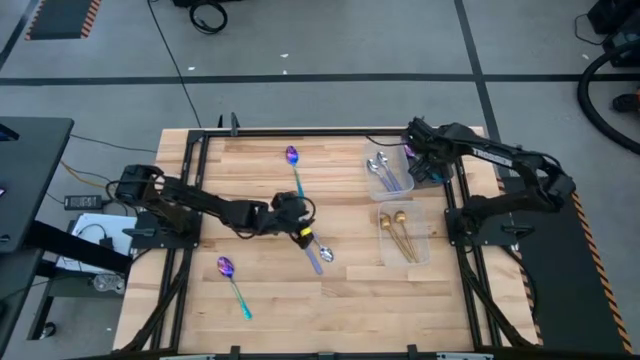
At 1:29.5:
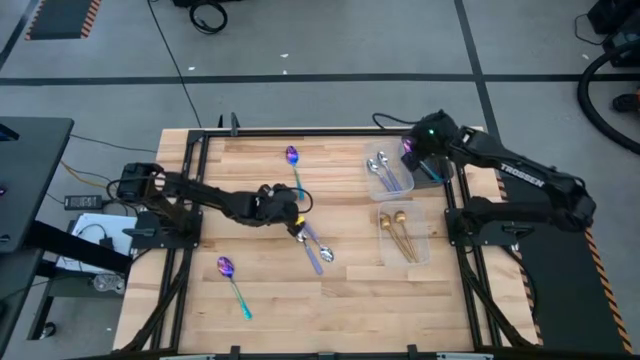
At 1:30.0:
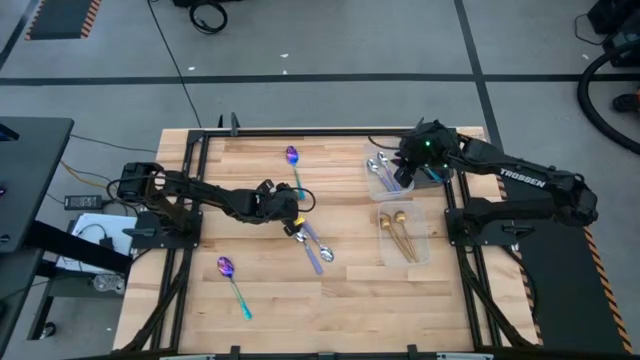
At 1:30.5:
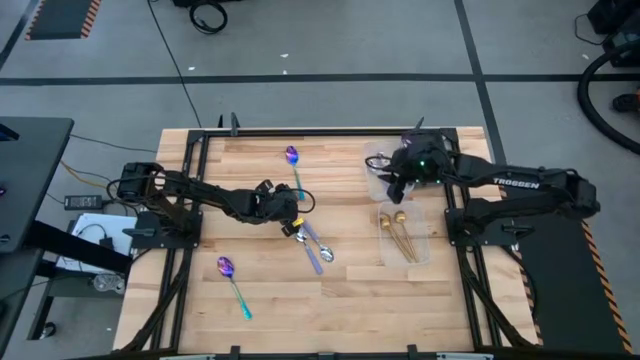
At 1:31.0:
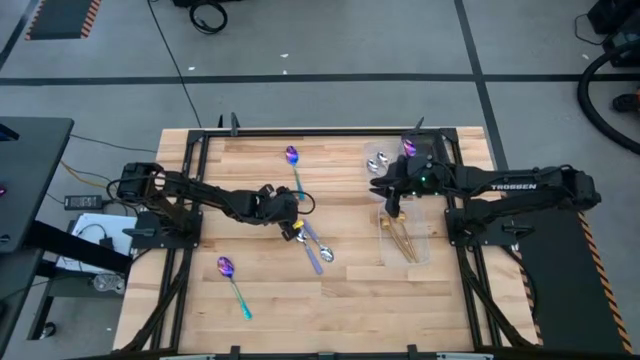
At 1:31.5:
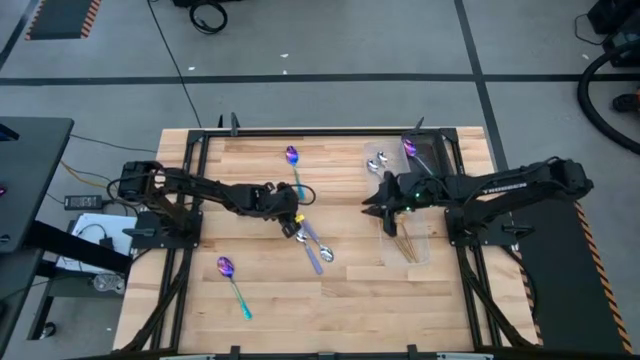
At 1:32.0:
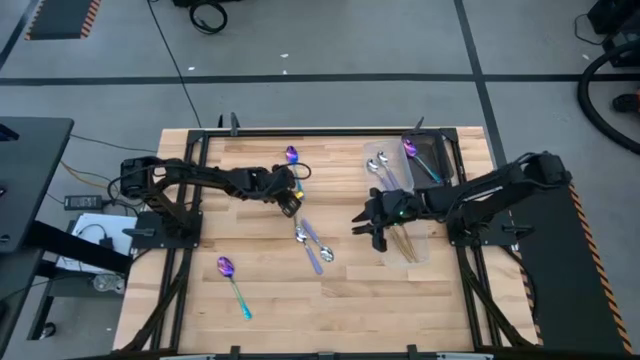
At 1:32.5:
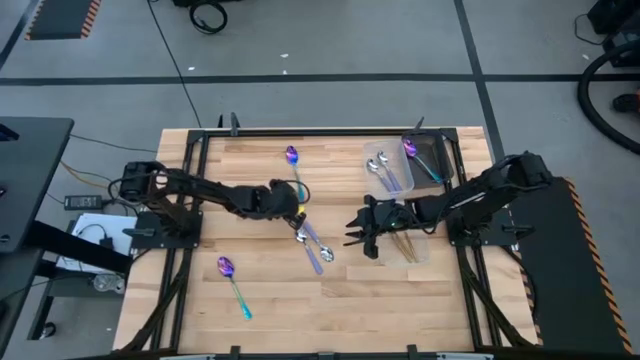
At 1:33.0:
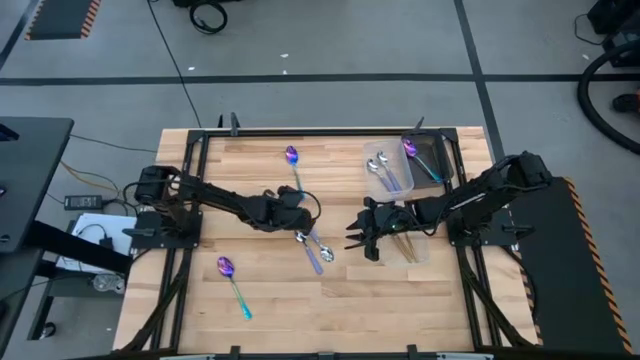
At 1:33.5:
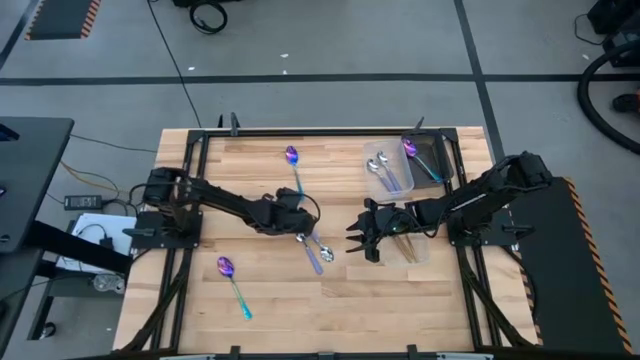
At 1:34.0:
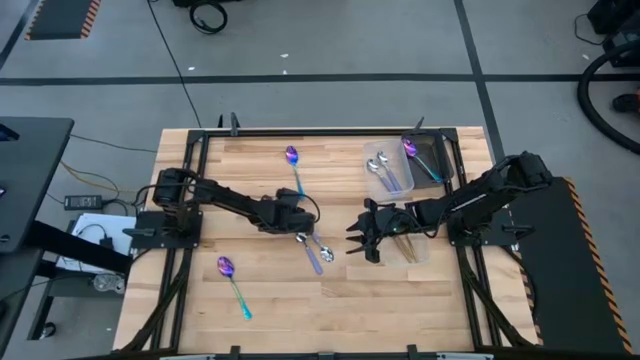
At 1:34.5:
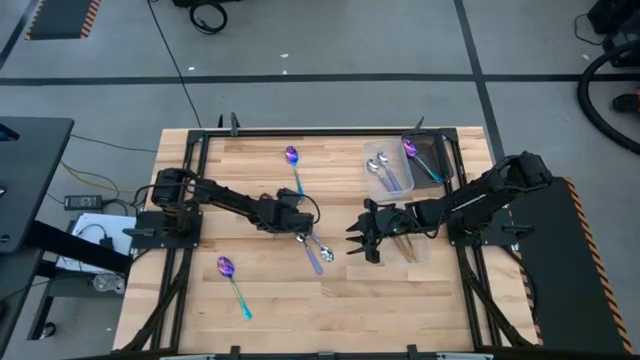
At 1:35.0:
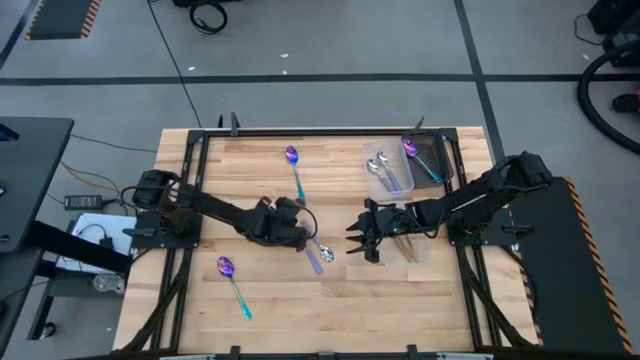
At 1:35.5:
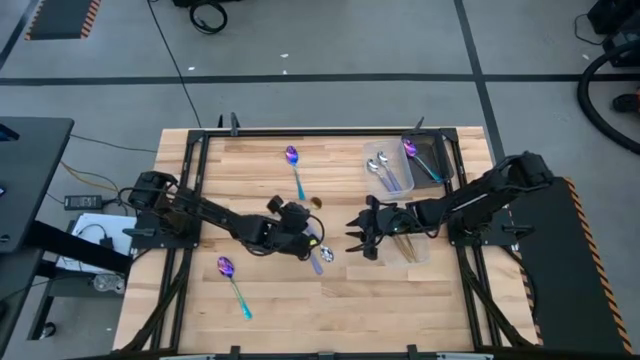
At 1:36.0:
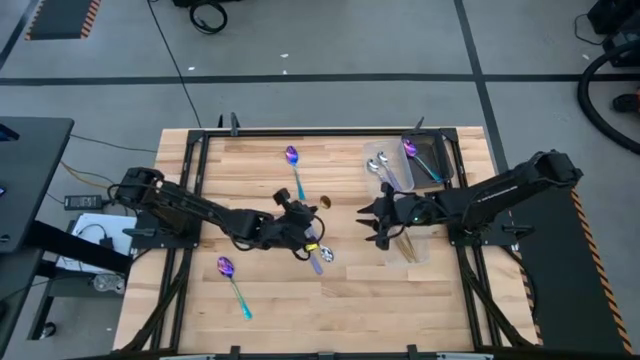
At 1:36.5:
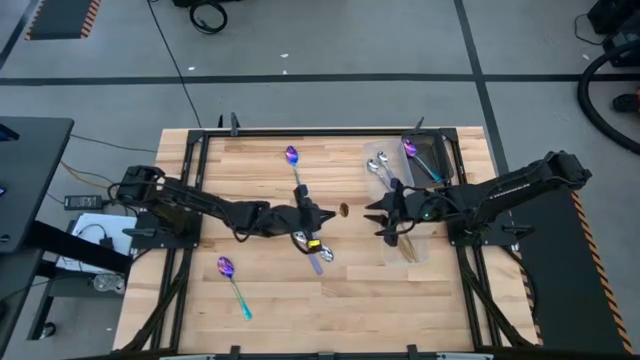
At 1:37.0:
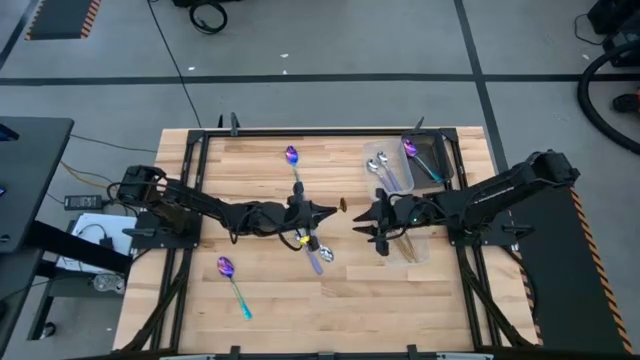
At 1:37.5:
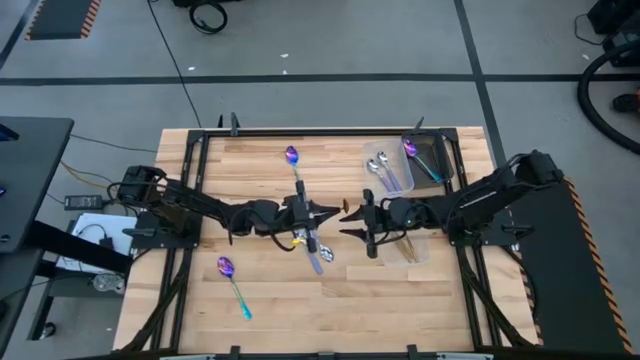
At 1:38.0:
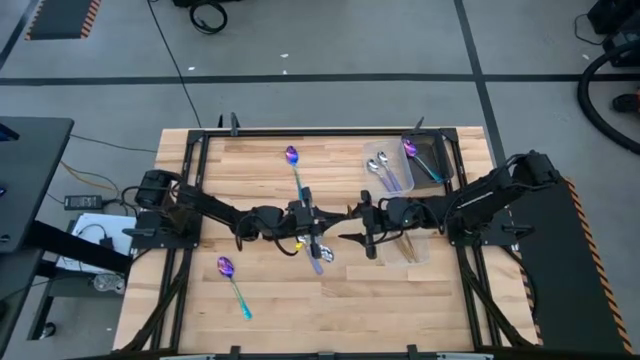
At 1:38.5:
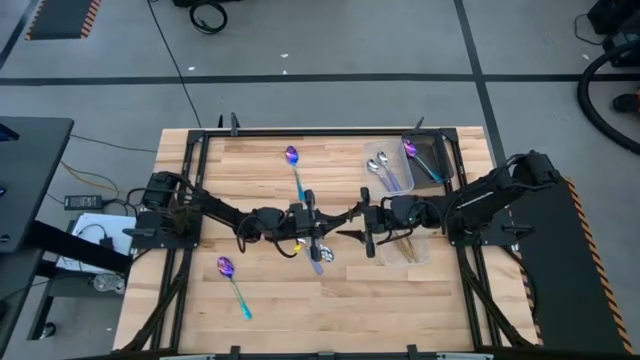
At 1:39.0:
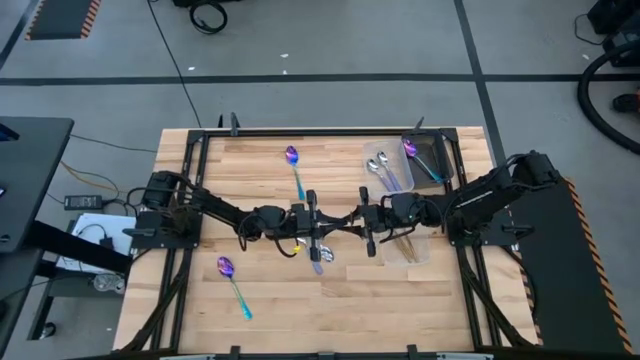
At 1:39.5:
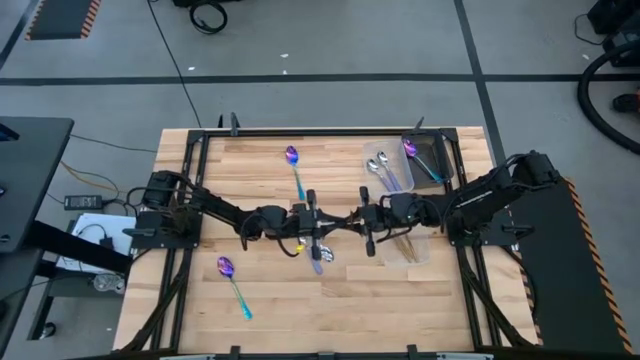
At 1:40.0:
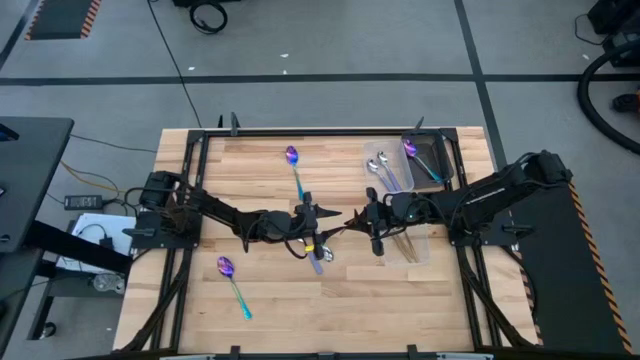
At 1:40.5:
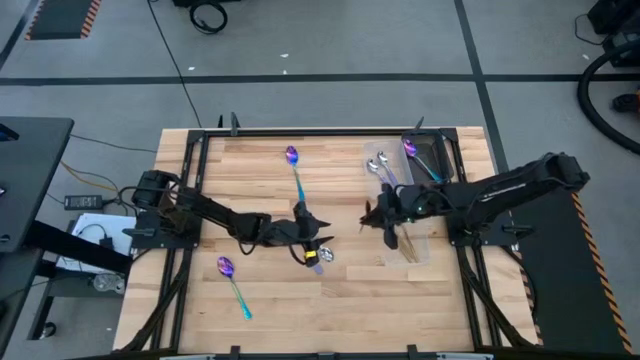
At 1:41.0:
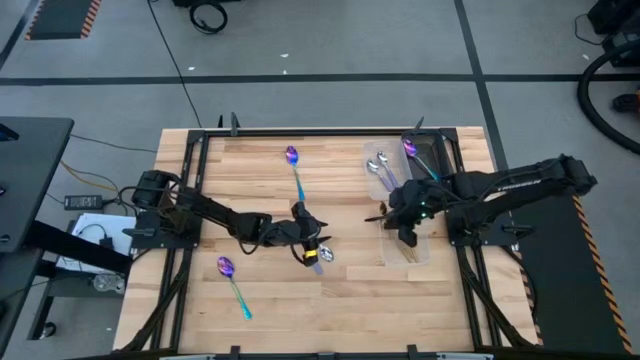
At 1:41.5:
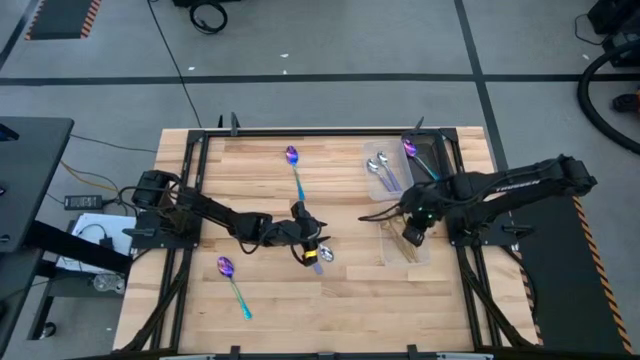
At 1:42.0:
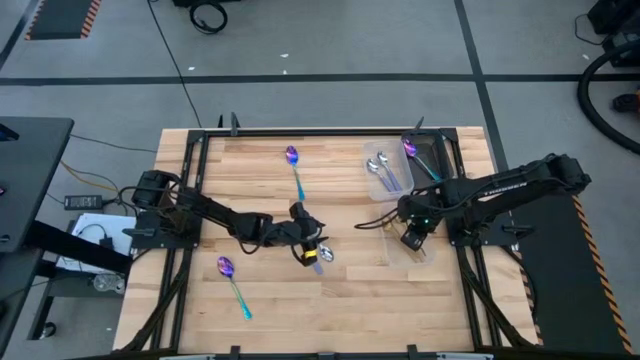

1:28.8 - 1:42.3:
Task: Sort silverware by color (type)
Put the gold spoon into the bottom transparent bin

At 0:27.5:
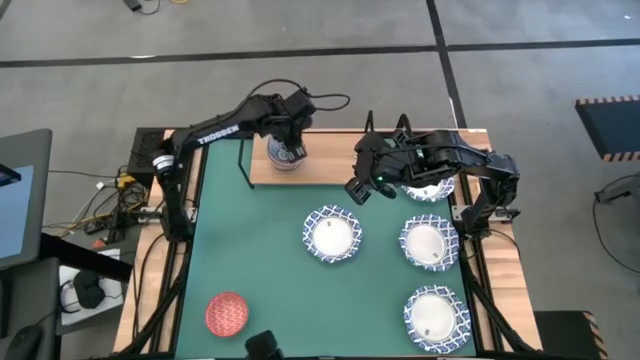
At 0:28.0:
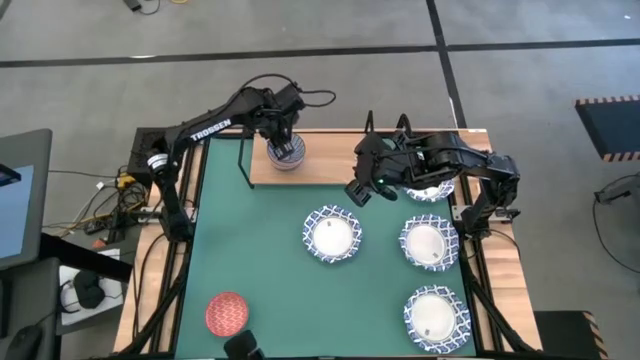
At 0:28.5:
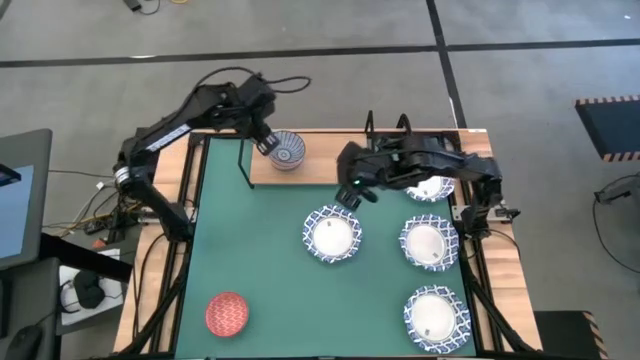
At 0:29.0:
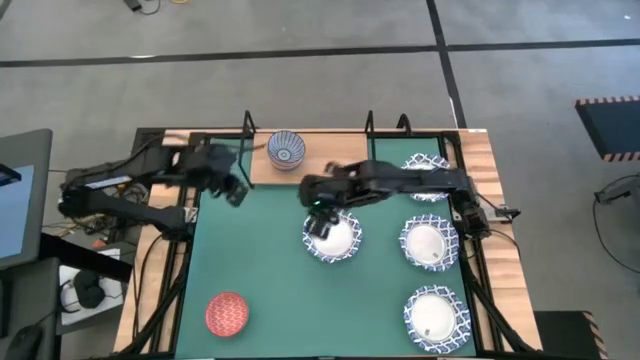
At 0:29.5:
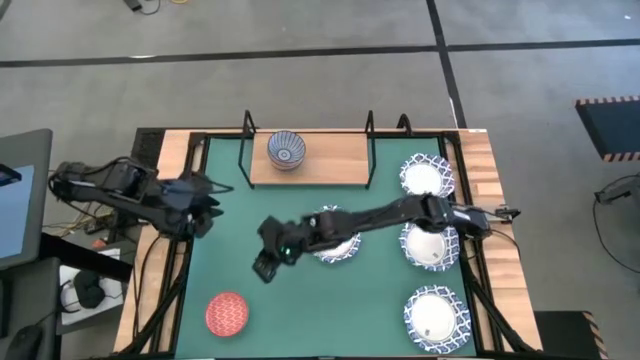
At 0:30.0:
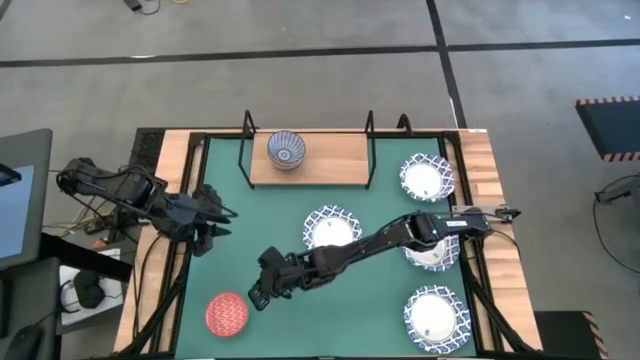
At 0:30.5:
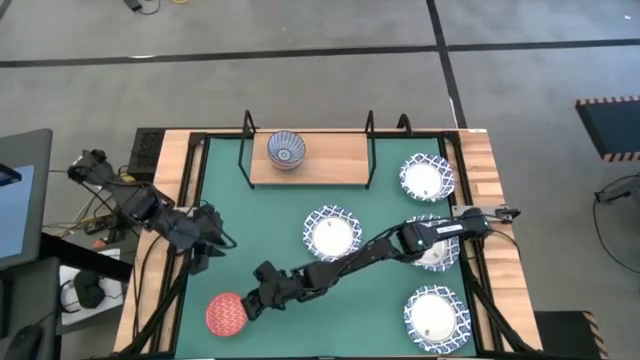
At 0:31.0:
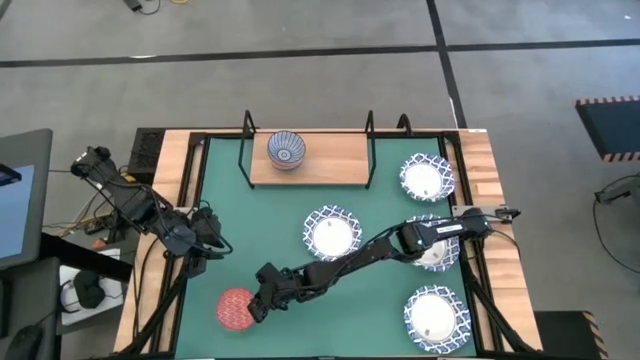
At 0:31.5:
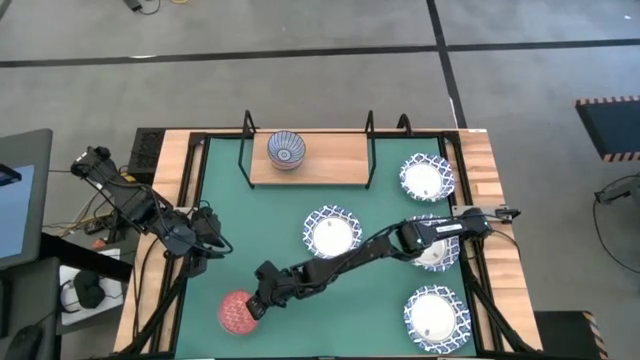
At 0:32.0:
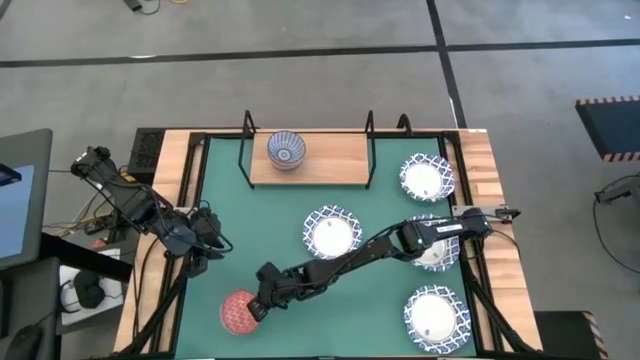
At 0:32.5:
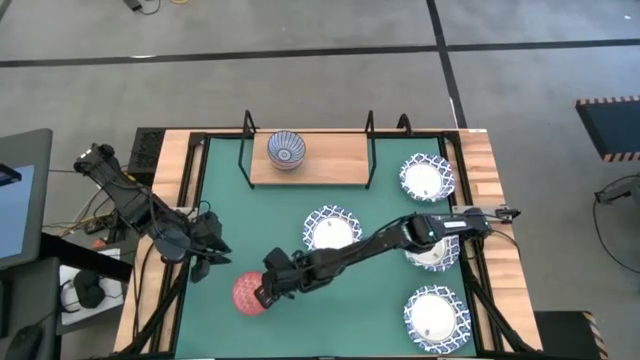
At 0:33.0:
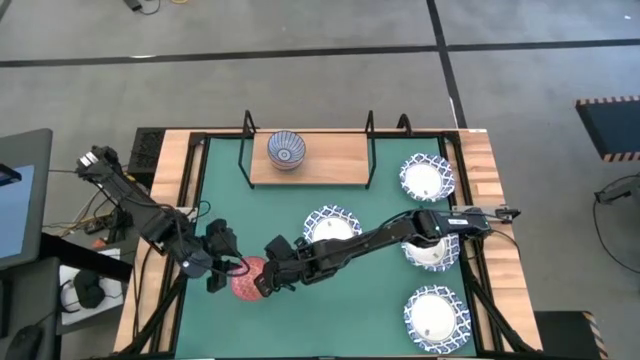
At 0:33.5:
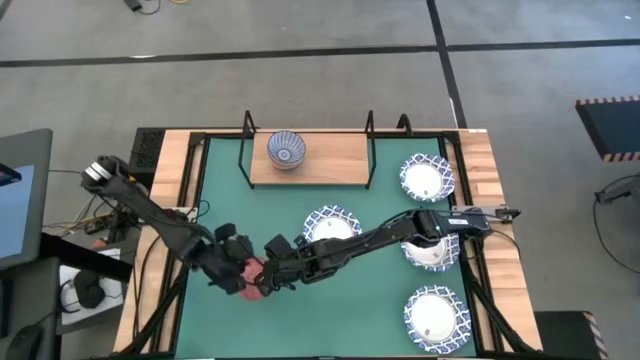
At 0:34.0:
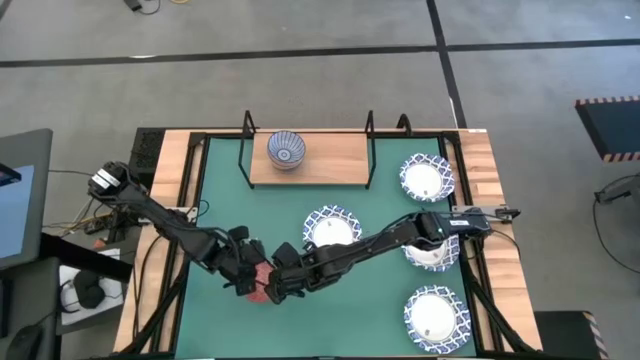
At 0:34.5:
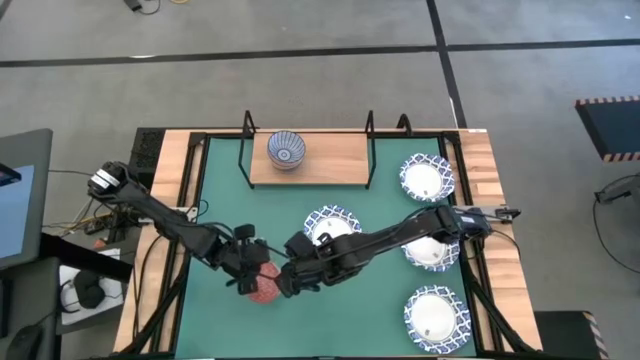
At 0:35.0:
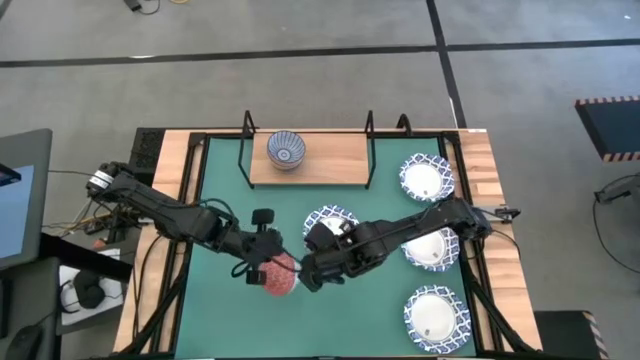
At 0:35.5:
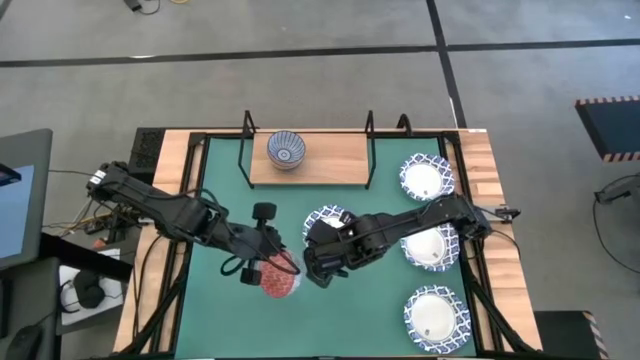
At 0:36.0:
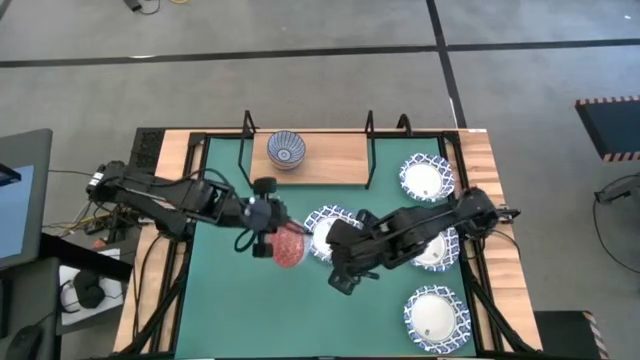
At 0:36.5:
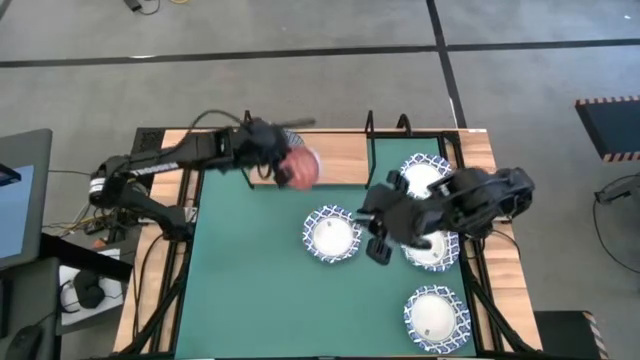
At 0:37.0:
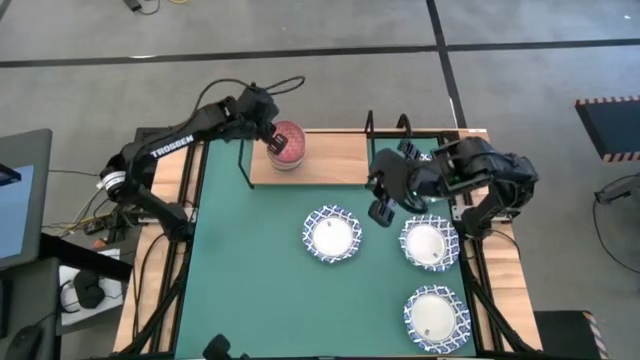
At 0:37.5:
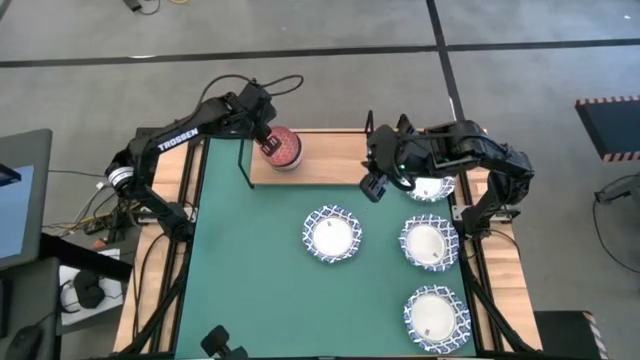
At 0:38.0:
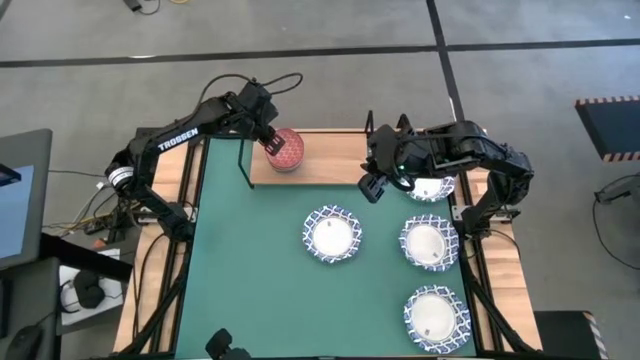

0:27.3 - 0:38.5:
Task: Place and stack bowls onto a shelf
Stack the small red bowl on top of the small blue bowl on the shelf
